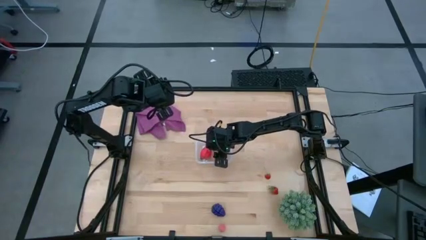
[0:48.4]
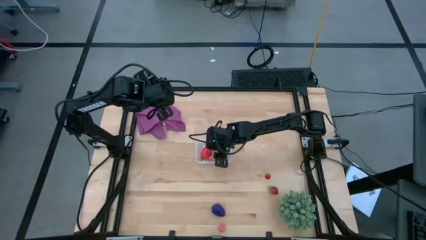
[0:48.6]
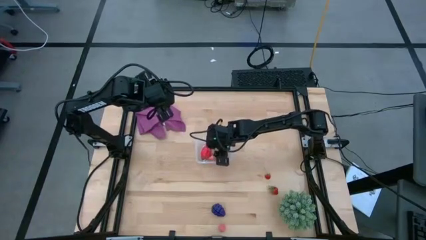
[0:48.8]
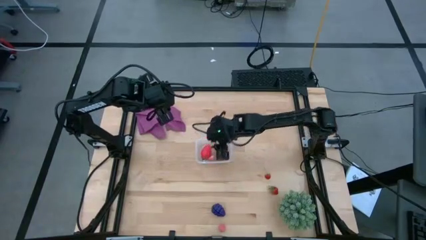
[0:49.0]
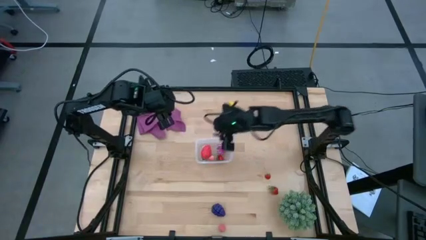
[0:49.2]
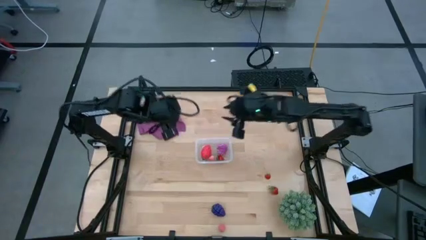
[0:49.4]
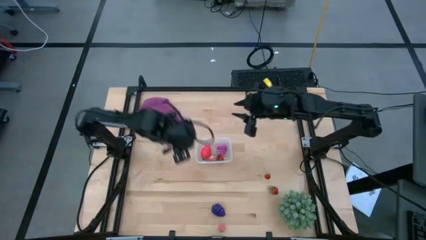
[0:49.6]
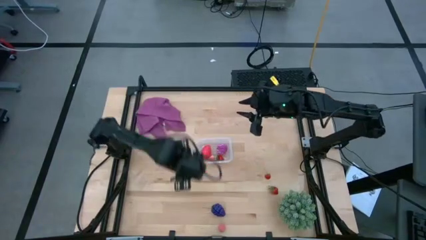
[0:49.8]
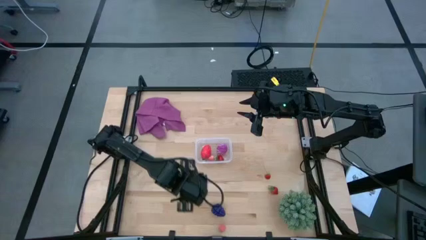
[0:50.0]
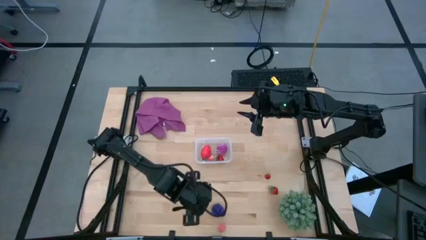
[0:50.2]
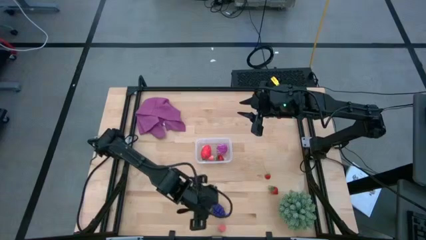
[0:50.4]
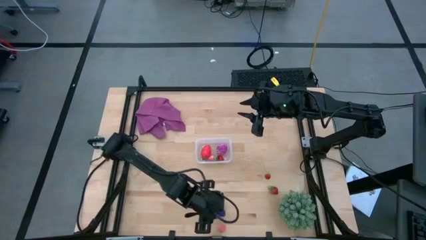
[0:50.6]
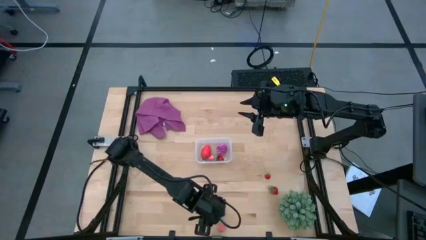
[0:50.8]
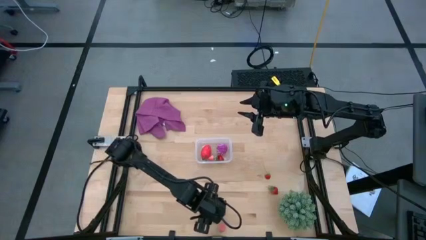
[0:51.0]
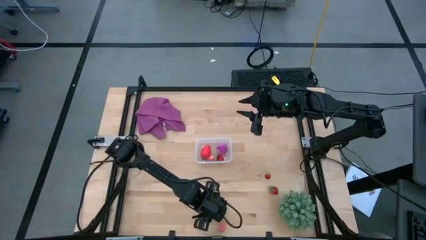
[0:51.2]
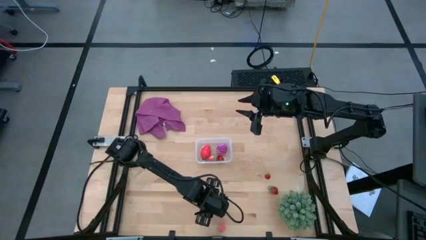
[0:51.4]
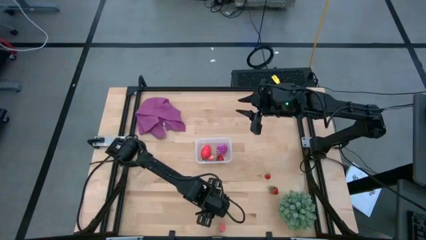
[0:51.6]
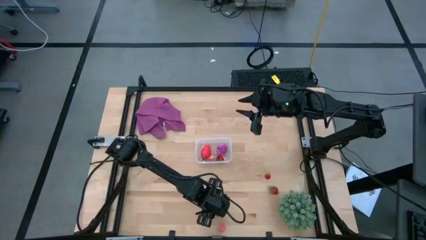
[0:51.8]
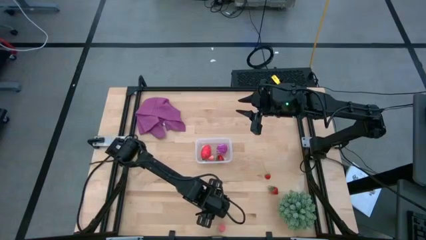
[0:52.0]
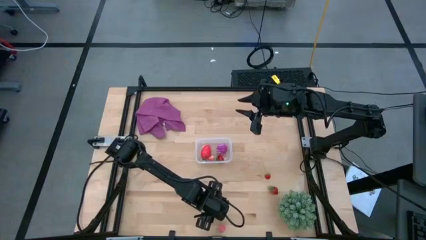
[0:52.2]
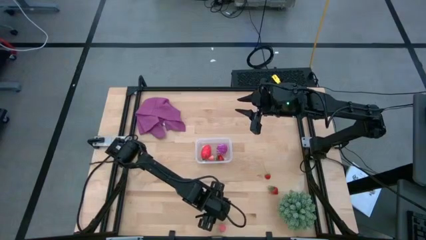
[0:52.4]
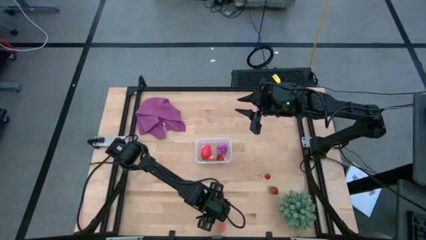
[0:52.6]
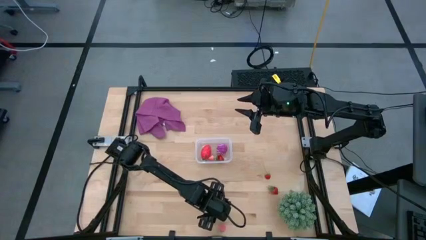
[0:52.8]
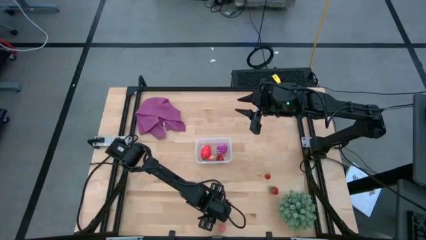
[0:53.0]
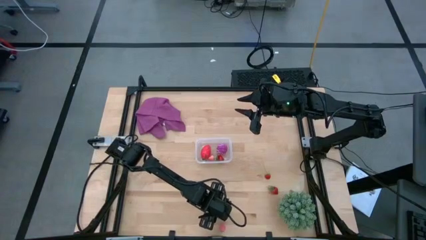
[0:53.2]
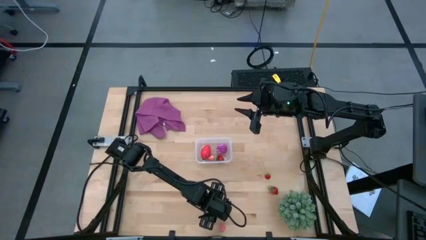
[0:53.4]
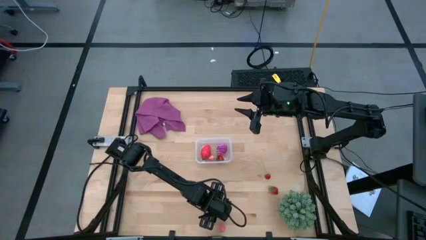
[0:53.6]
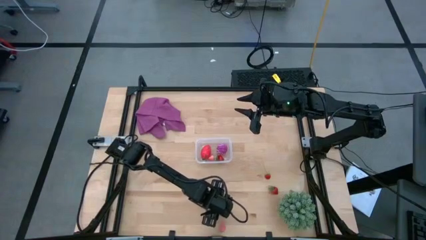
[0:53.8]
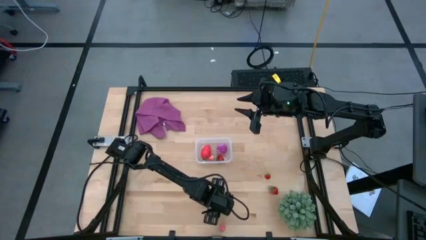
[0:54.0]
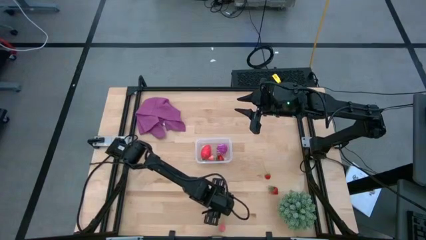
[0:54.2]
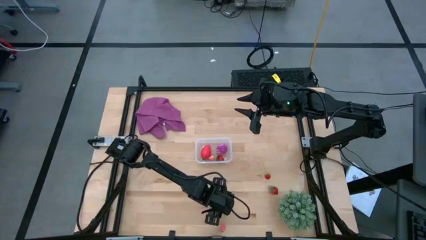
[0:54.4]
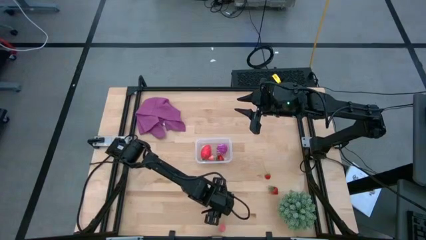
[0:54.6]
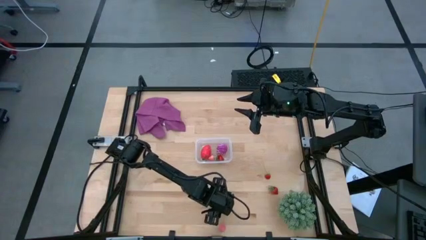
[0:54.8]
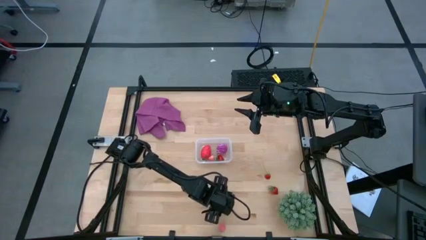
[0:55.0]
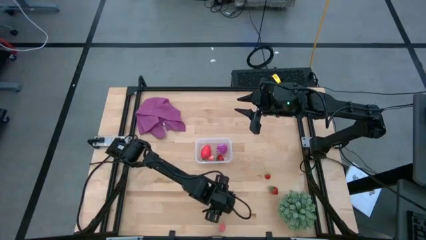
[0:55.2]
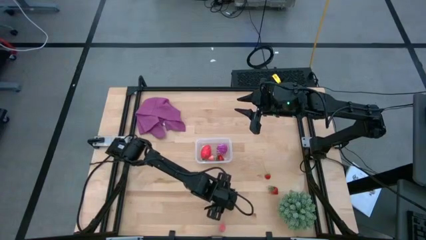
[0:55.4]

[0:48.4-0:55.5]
Task: Pick and placing Produce into tupperware
Put the violet grapes into the transparent bin

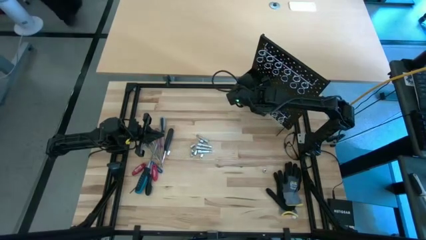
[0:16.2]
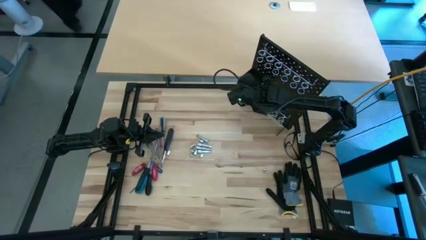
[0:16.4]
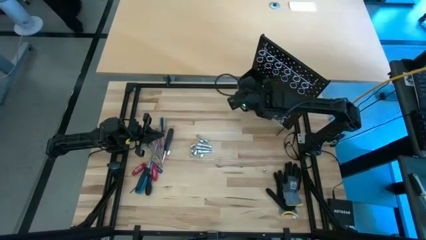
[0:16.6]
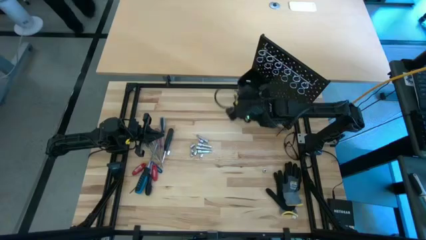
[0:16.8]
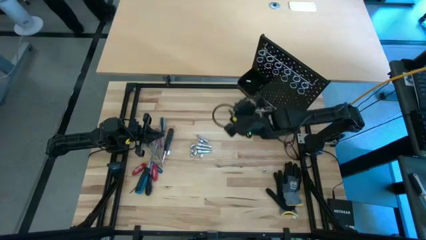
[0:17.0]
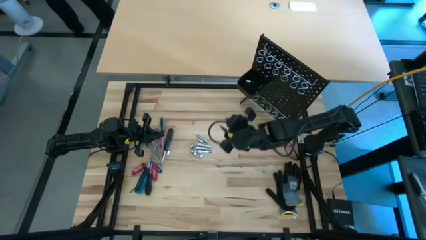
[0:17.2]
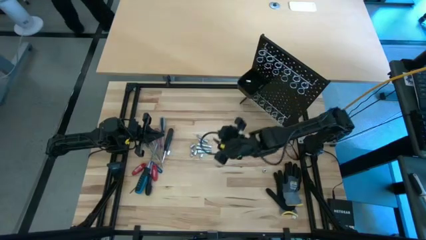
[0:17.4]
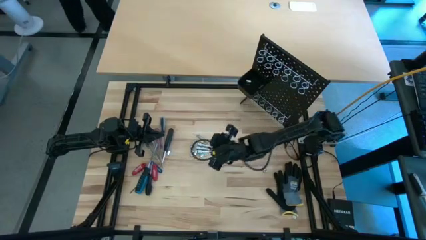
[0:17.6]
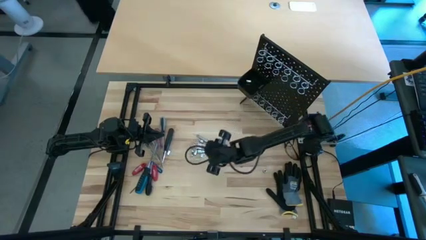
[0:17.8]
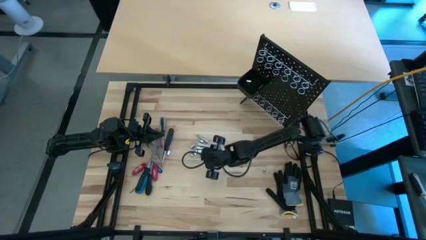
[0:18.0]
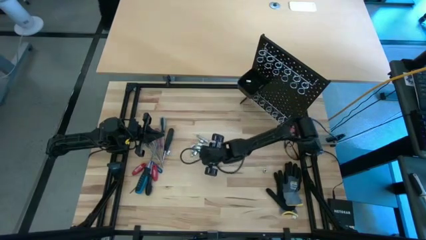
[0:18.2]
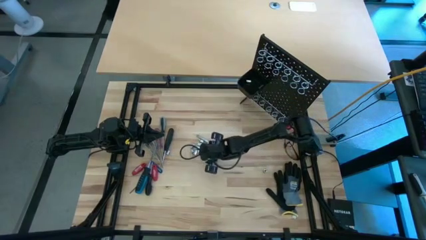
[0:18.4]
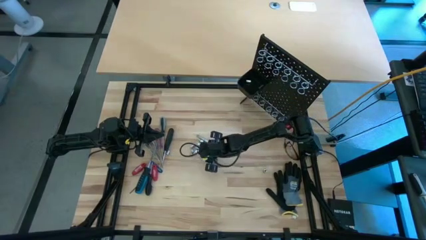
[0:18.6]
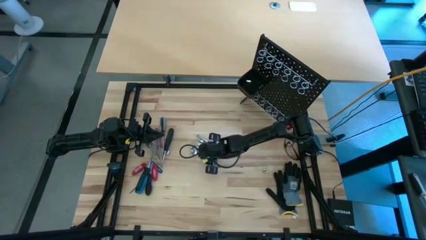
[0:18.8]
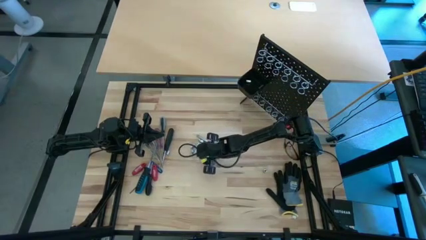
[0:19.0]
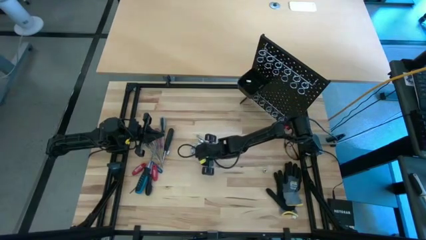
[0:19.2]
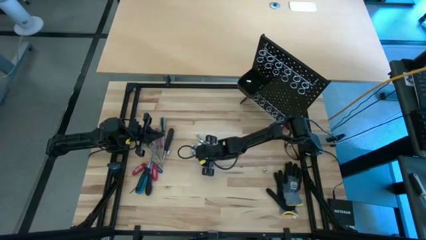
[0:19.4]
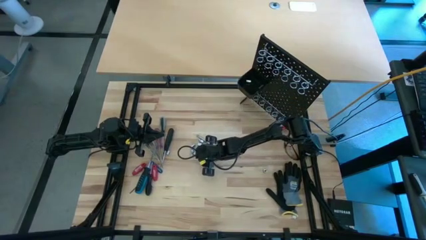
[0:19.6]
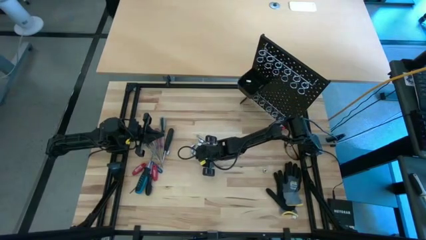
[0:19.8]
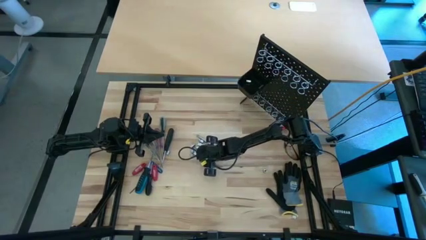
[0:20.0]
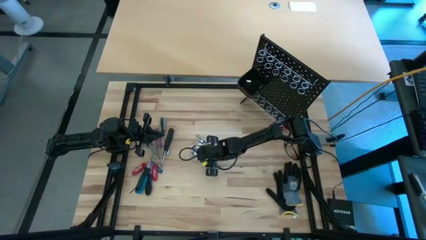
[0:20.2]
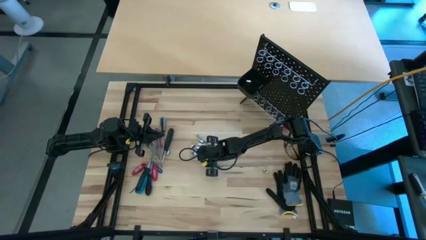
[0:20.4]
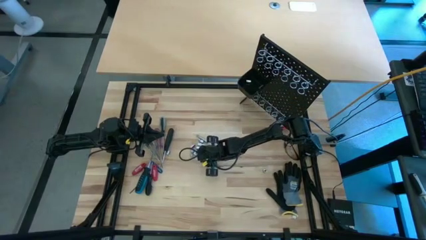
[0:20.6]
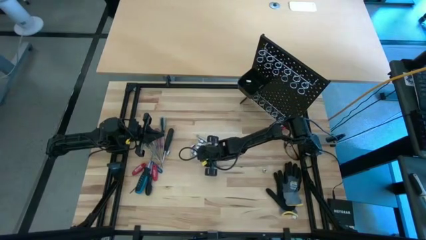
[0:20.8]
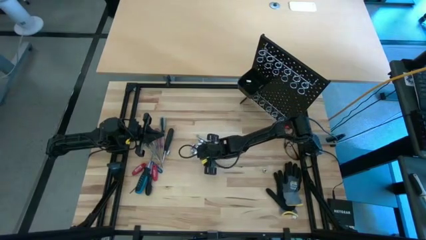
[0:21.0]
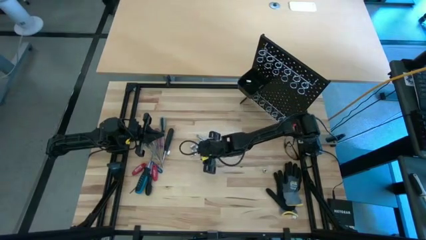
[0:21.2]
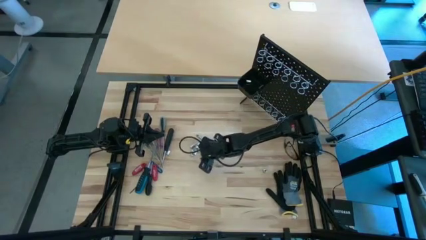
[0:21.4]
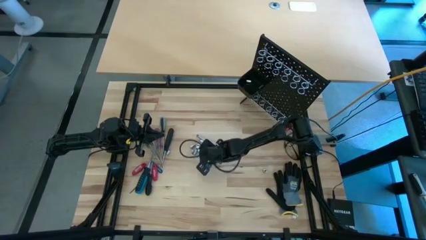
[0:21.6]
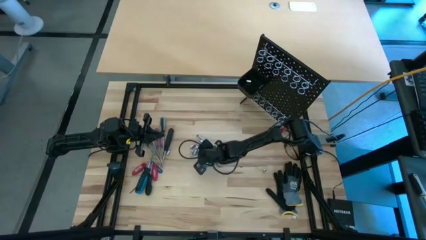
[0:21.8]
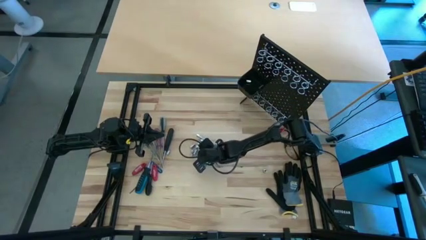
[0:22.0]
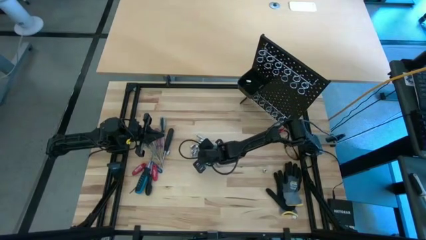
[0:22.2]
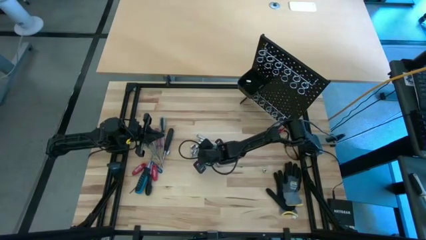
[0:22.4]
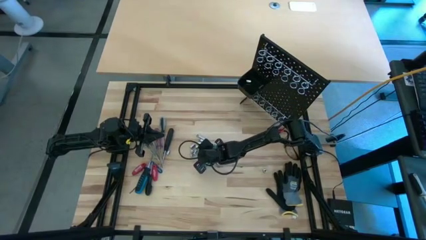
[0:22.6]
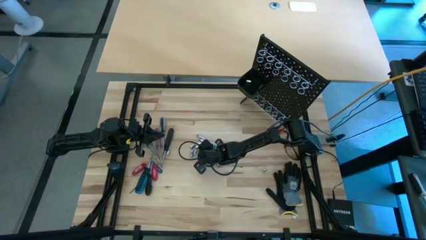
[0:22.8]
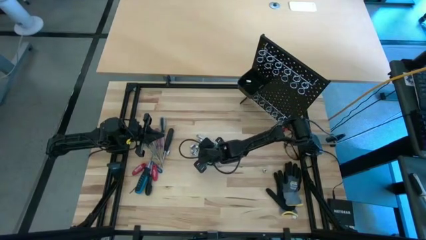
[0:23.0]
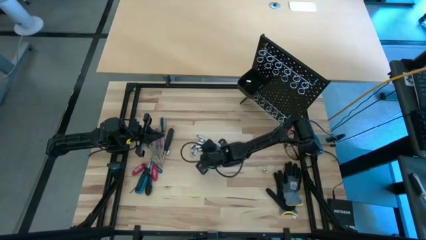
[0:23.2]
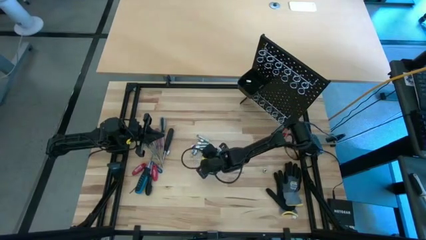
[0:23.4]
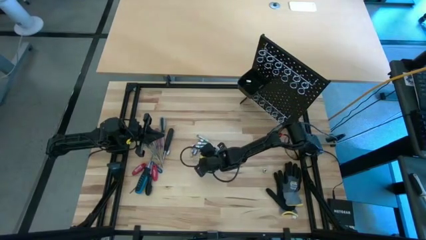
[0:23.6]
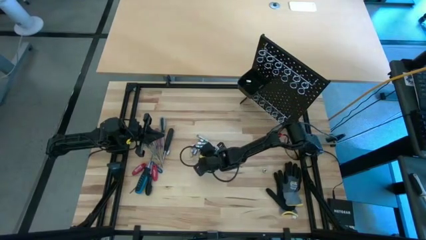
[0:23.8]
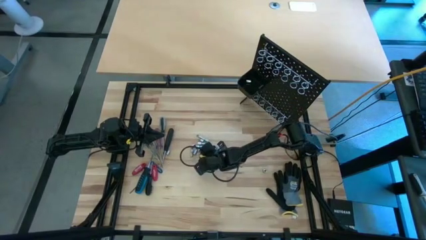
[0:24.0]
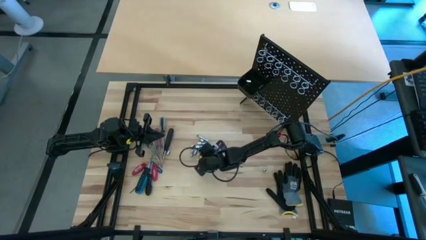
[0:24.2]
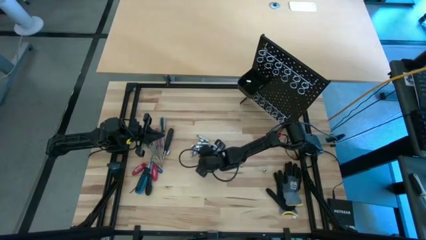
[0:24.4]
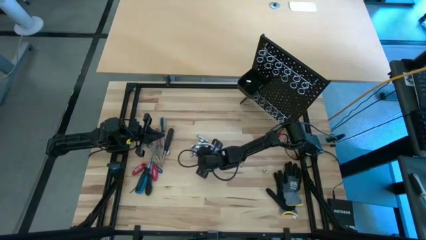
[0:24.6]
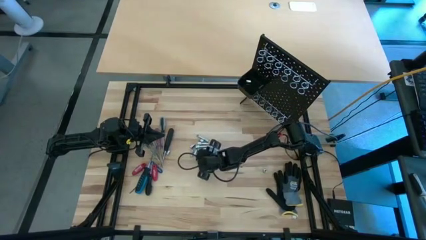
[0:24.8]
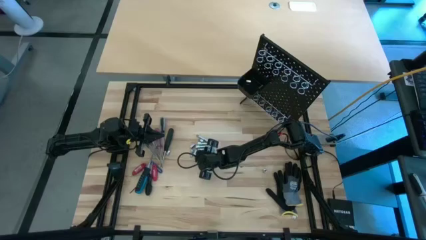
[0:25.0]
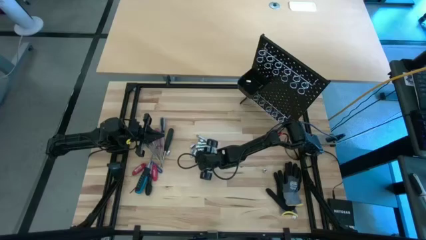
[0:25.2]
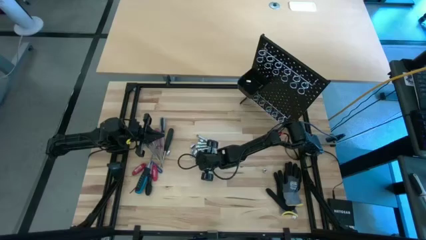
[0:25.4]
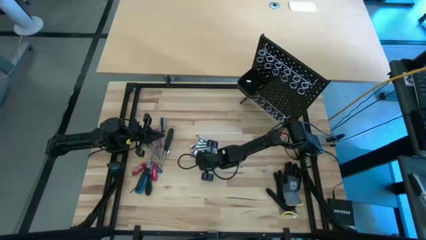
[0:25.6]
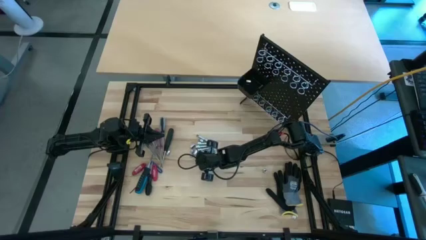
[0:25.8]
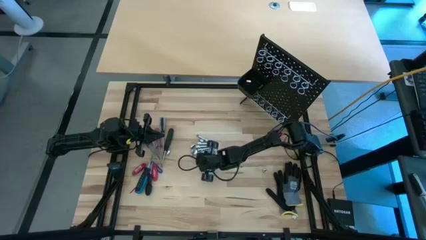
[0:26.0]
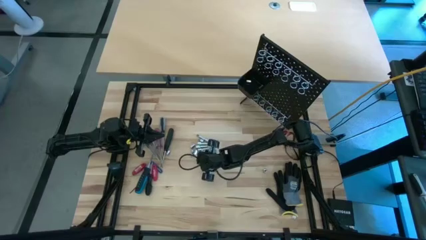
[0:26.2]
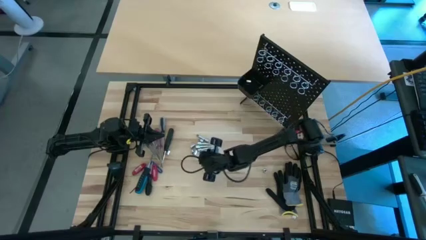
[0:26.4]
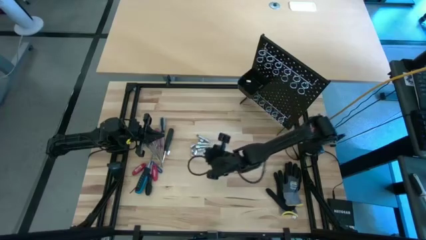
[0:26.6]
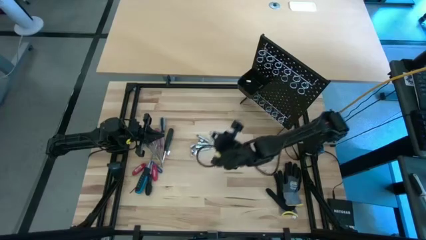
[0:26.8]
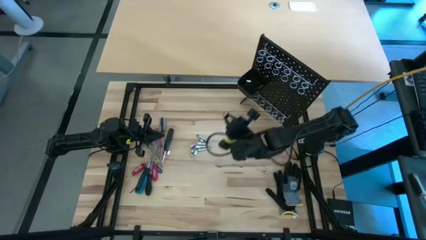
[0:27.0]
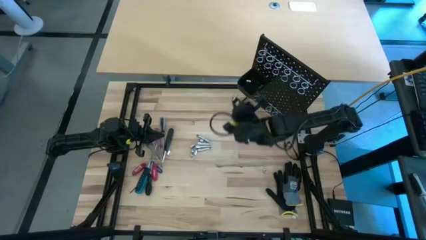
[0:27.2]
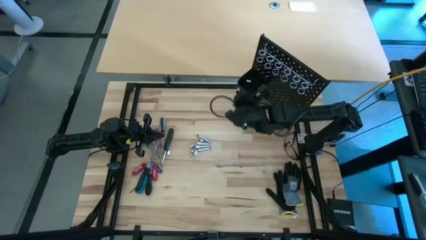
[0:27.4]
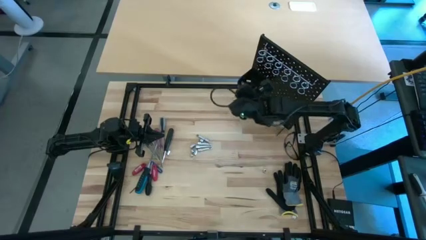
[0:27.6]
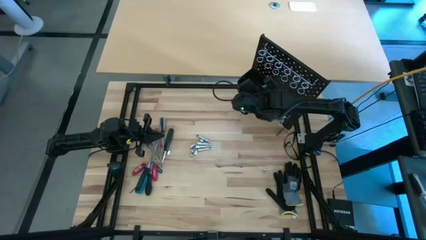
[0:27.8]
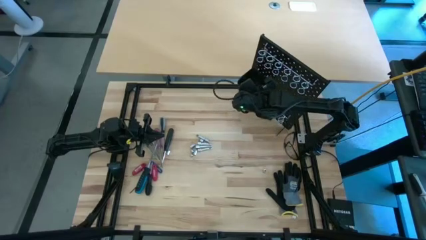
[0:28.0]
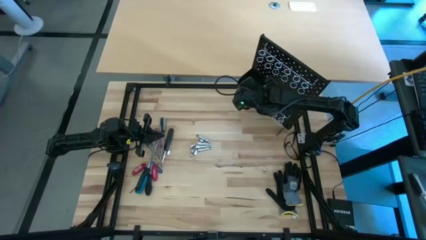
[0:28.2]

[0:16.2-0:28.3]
Task: Hang tools onto peg board
Put the socket into the black pegboard bin
